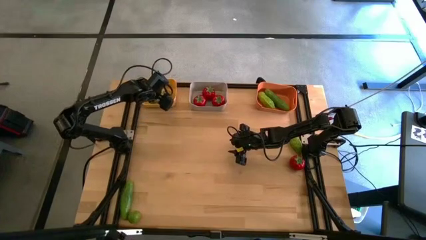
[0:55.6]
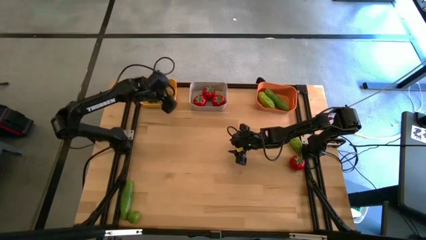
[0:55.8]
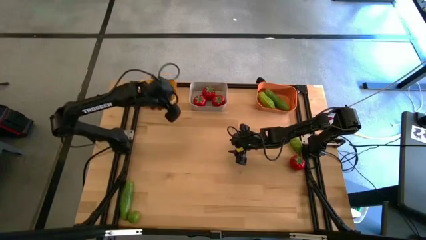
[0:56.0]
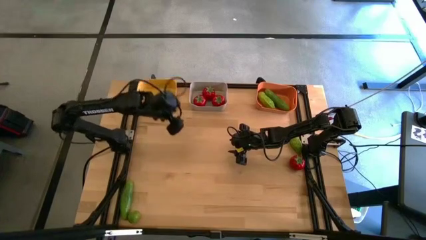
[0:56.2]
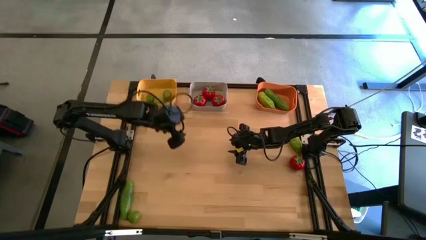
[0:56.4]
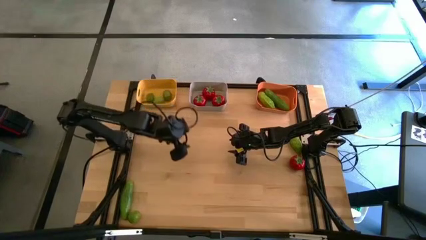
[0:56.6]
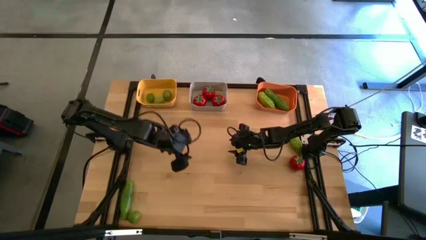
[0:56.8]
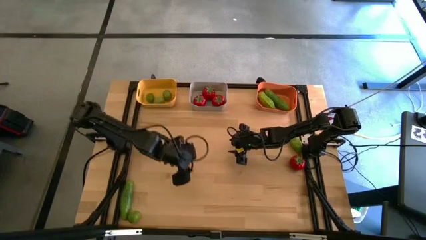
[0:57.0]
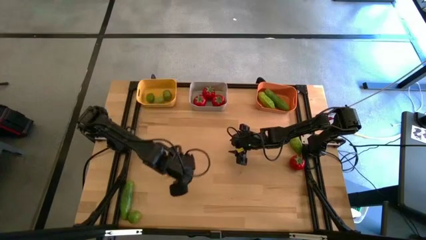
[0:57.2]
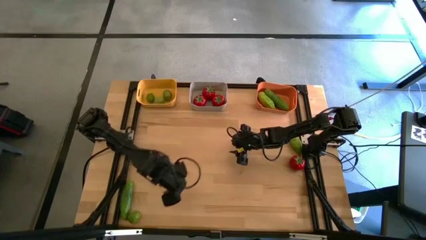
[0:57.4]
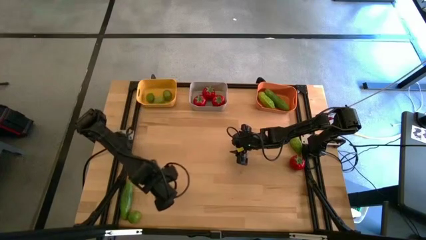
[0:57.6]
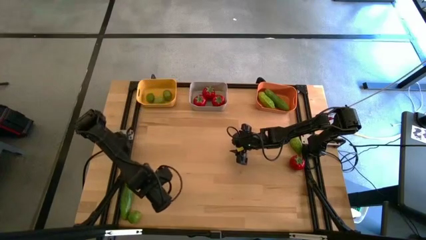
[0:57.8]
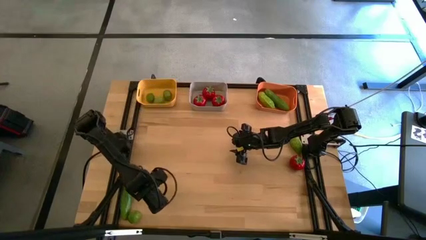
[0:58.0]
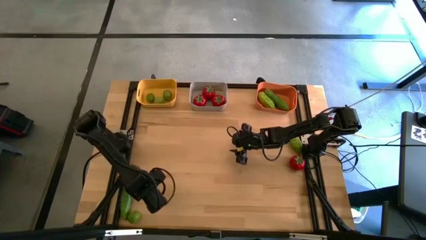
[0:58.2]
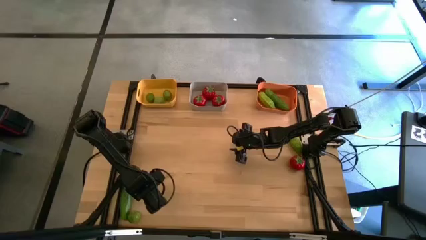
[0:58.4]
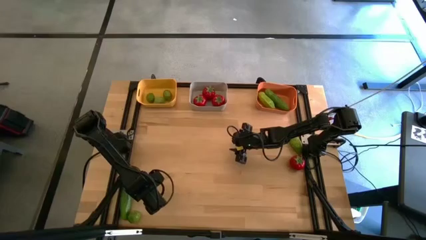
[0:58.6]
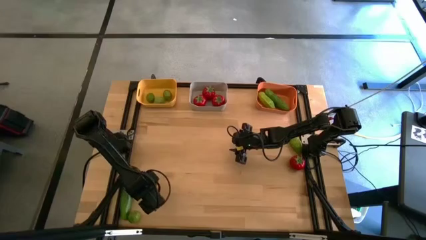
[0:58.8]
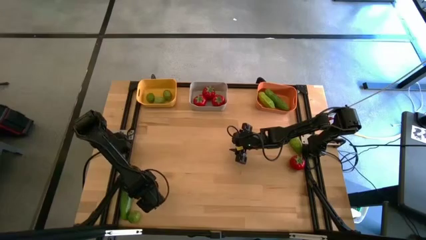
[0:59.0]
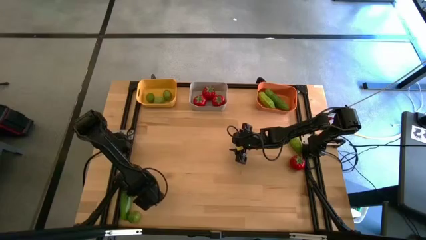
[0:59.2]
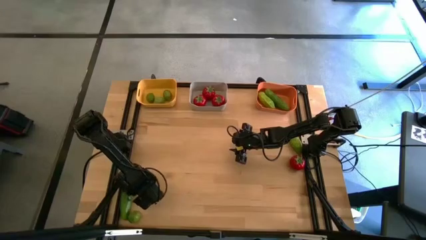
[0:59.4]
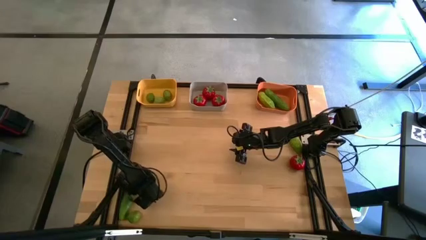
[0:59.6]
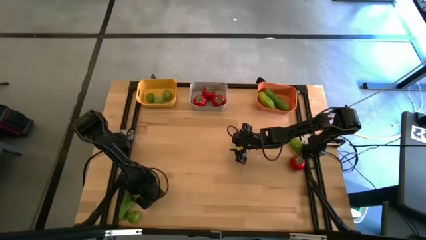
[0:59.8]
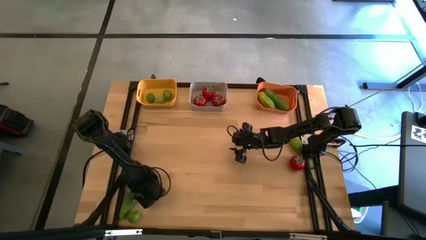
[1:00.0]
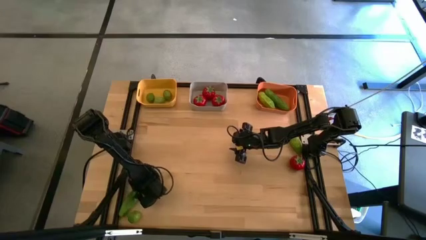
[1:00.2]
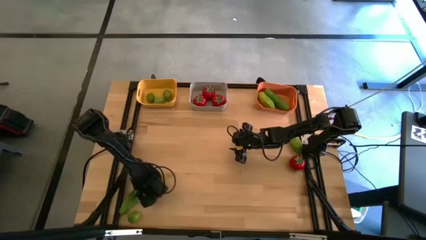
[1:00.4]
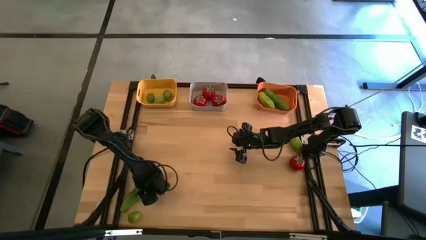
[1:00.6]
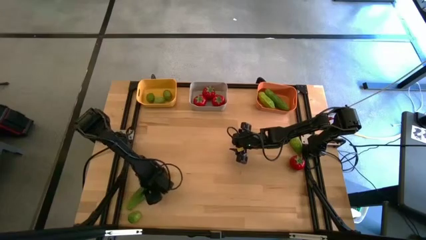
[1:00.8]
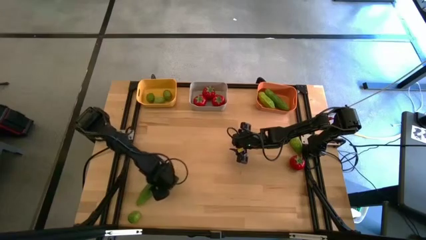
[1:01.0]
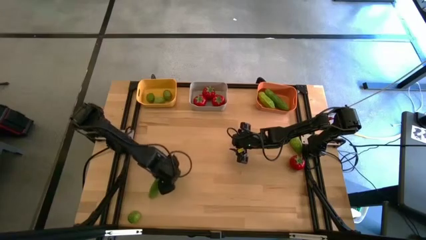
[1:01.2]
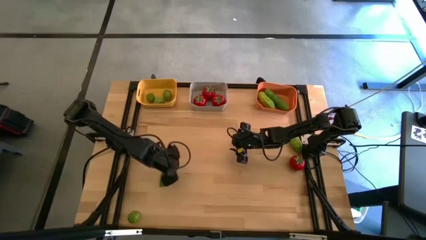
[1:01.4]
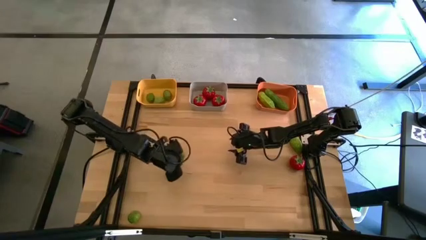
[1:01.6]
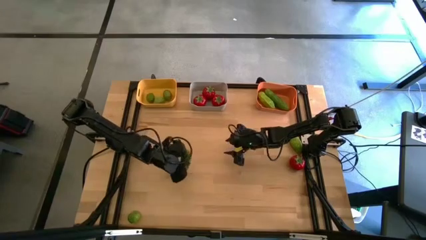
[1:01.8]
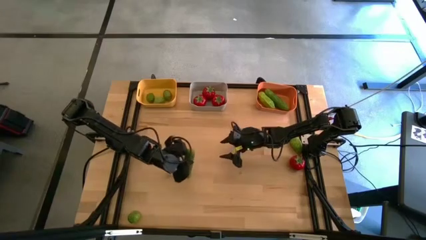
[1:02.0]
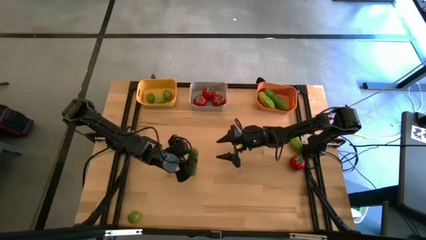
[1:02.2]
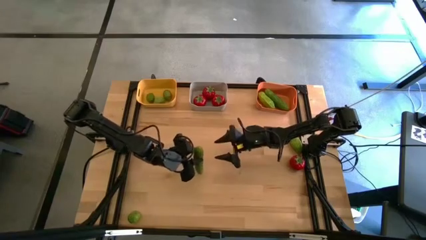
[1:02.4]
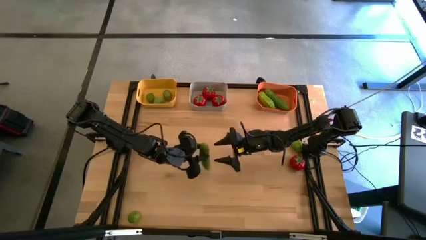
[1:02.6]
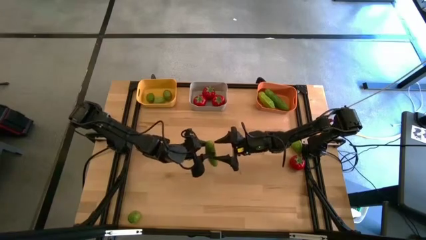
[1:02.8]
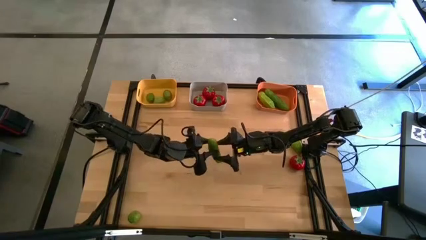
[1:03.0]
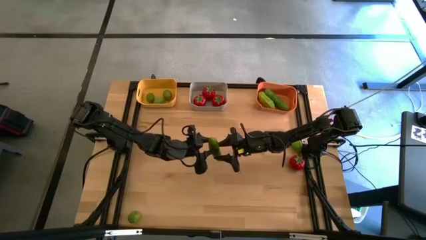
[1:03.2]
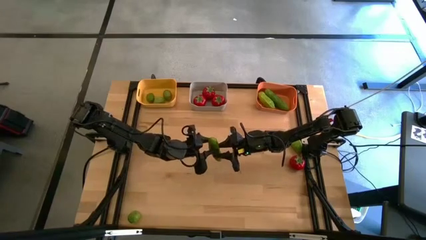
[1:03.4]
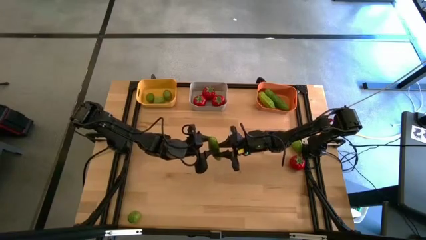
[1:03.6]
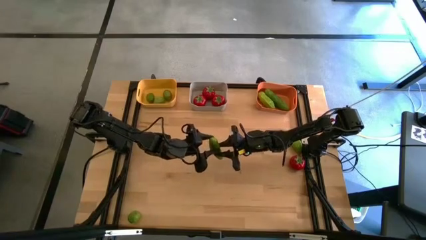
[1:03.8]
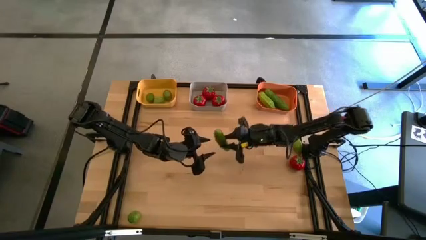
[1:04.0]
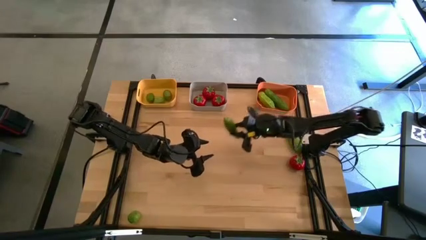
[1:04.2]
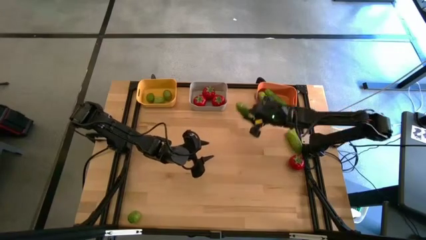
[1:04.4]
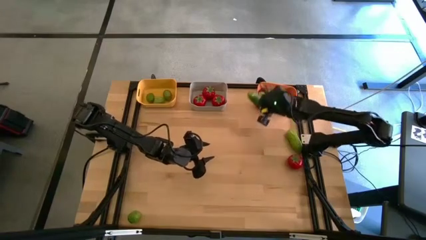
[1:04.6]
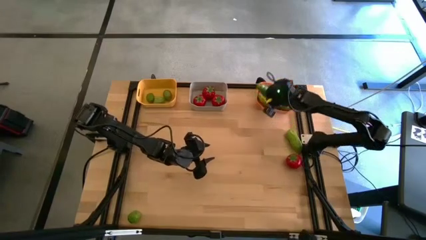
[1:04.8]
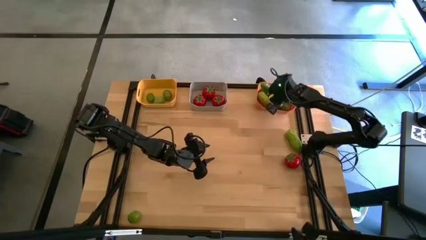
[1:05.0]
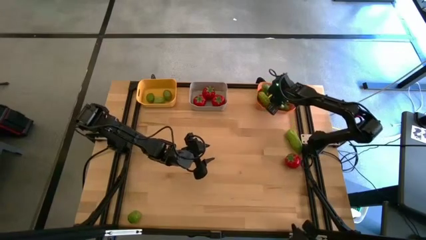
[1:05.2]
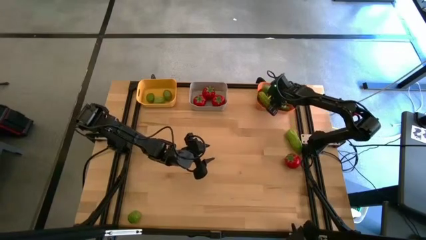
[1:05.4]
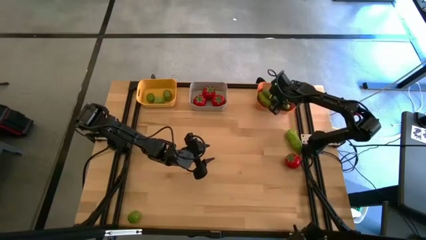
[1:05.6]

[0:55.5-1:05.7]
Task: Sort produce into baskets
Put the cucumber into the orange bin

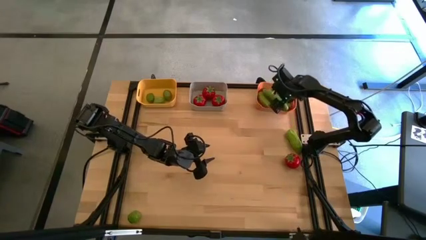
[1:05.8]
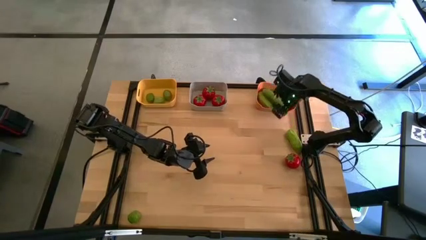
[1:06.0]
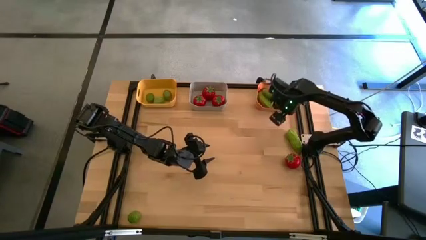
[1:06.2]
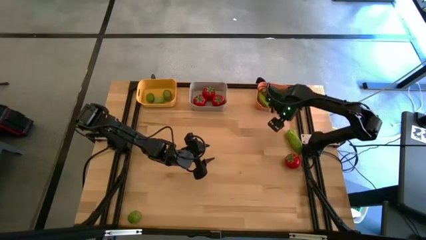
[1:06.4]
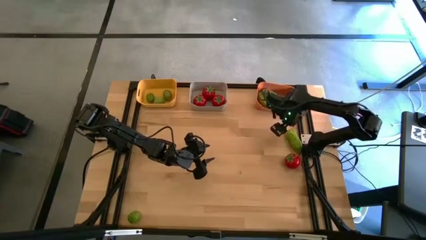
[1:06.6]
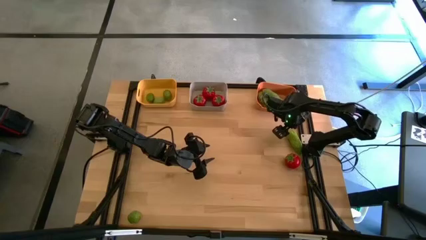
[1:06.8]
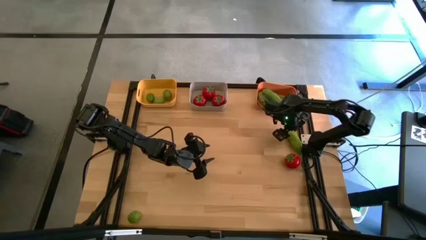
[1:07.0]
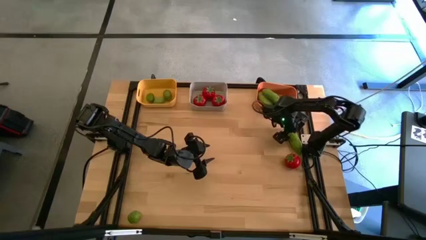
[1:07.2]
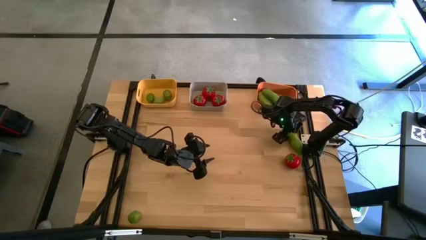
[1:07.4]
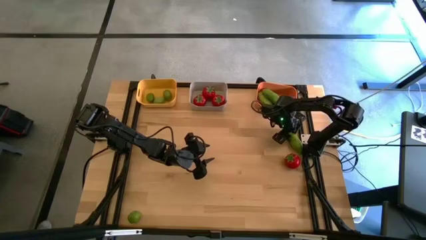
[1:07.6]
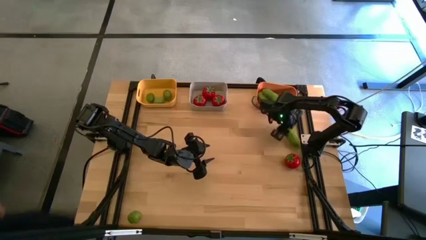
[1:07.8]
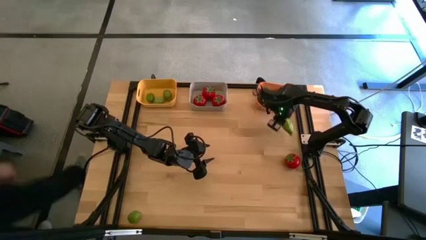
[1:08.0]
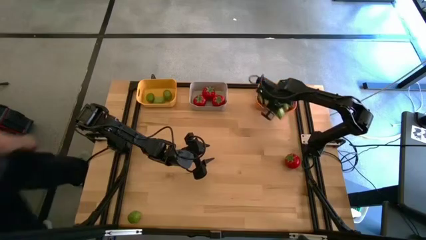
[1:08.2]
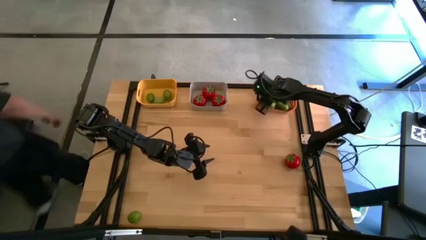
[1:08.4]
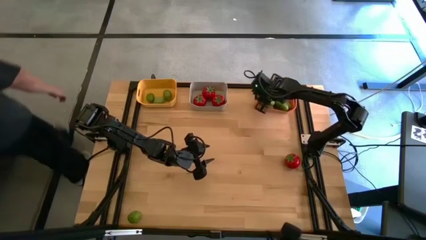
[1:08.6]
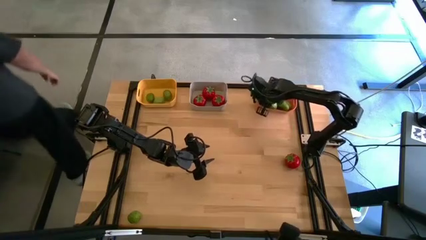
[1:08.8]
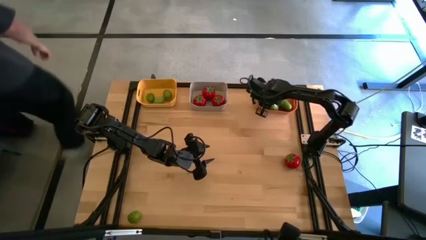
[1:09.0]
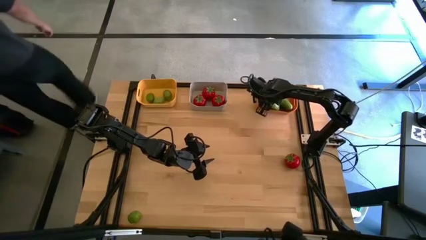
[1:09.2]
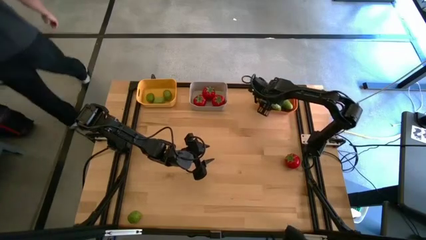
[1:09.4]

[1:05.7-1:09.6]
Put the cucumber into the orange bin

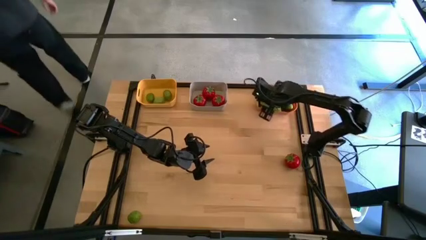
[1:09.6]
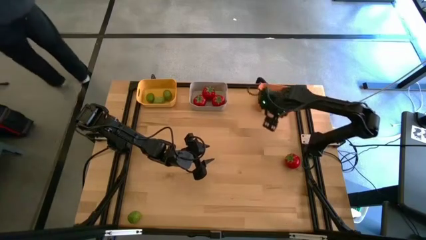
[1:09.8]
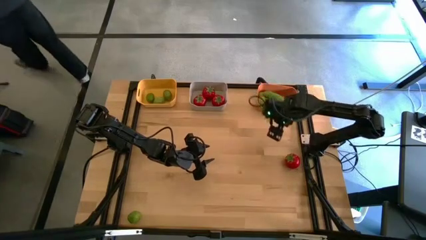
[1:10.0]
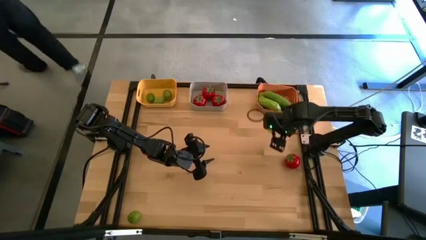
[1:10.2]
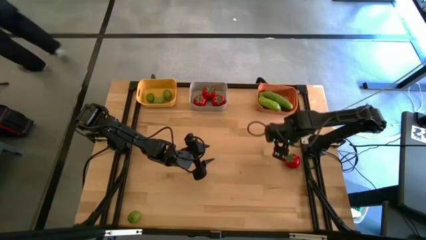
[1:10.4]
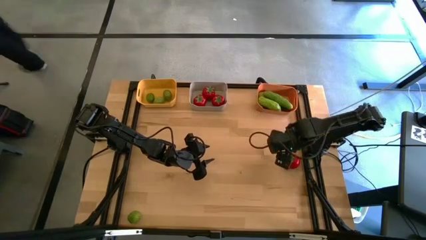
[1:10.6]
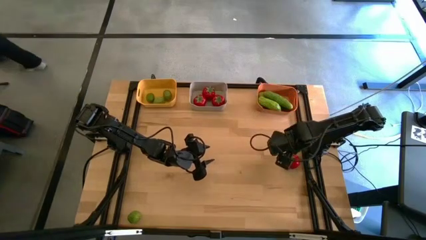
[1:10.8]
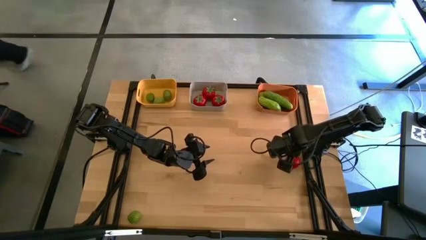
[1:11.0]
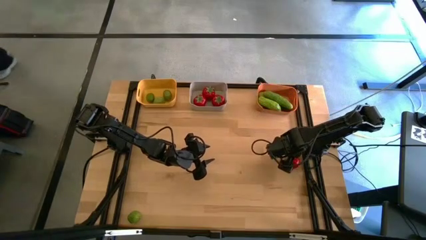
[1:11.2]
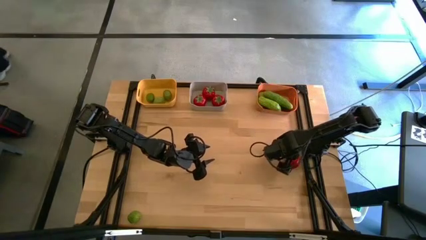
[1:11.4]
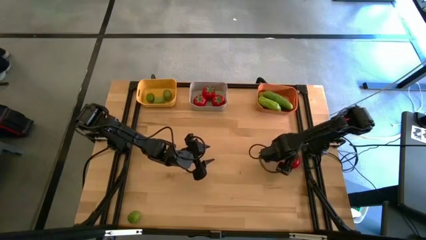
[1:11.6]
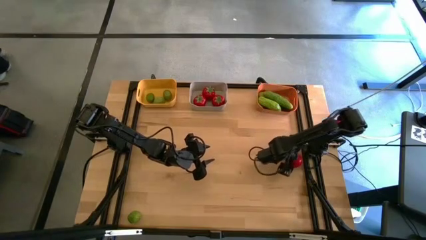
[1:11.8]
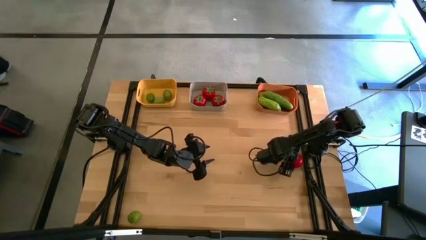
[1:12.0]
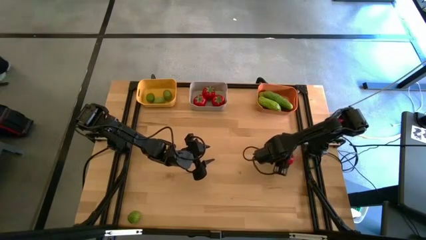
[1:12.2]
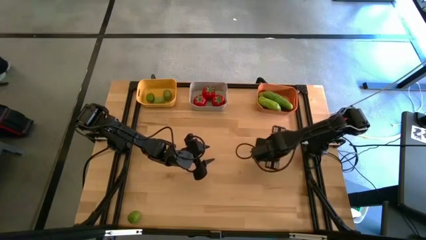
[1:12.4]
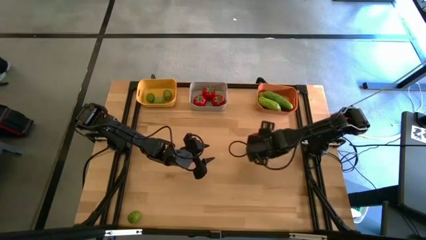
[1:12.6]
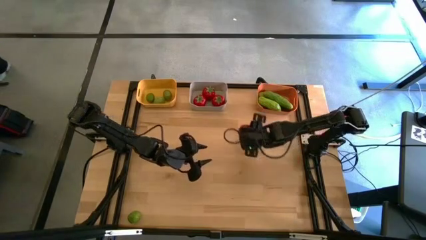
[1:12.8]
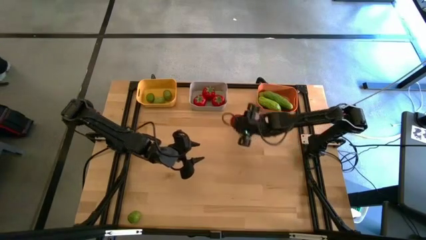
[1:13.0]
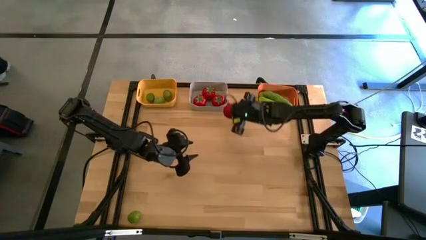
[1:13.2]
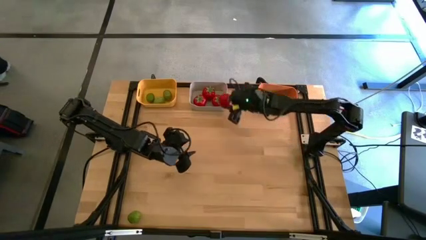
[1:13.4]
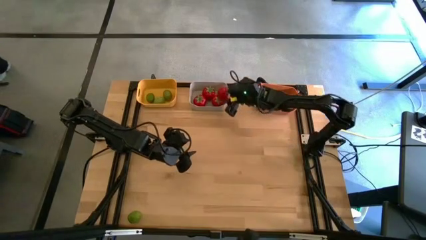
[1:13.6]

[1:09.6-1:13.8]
Put the tomatoes into the gray bin
